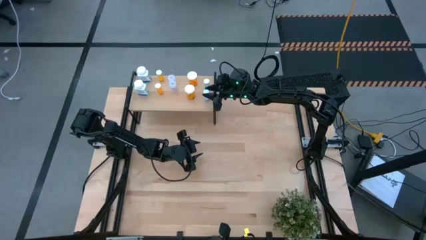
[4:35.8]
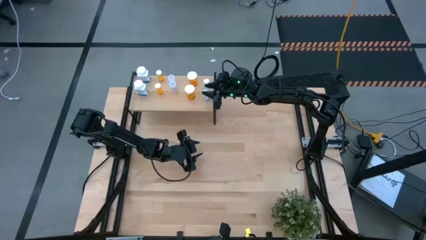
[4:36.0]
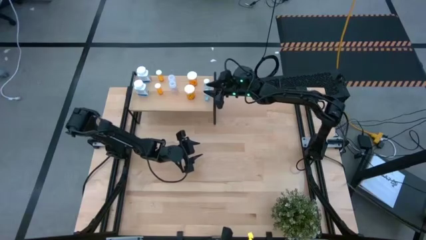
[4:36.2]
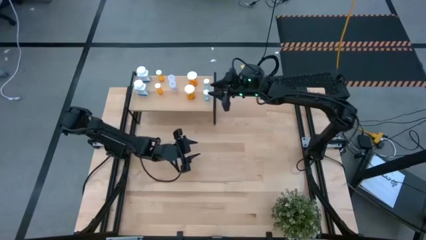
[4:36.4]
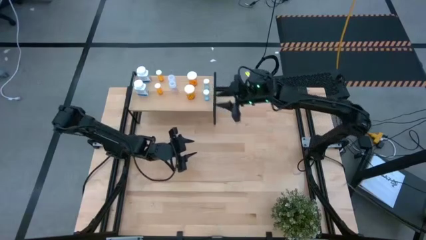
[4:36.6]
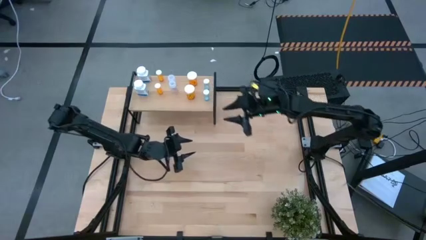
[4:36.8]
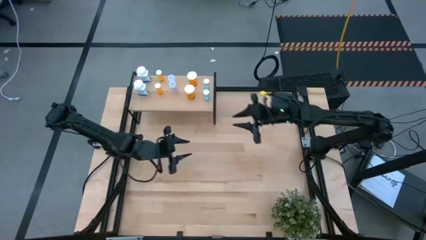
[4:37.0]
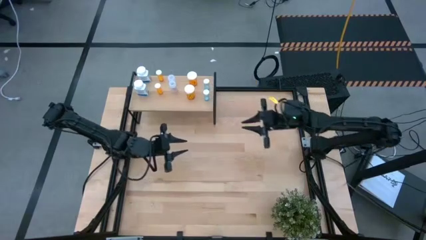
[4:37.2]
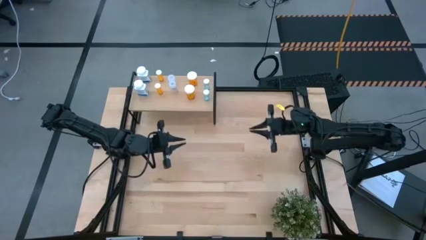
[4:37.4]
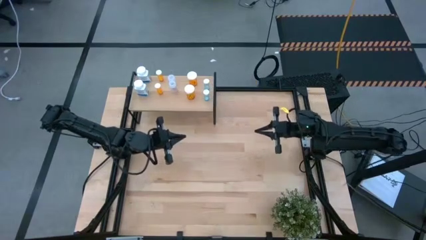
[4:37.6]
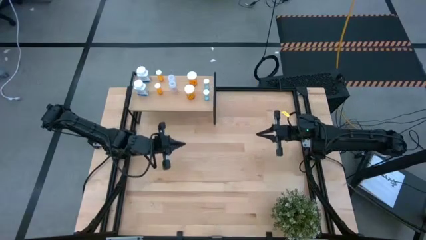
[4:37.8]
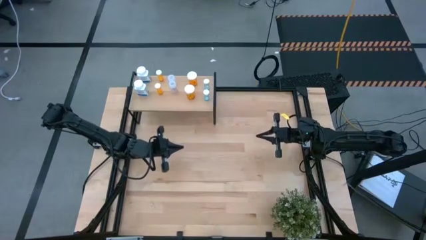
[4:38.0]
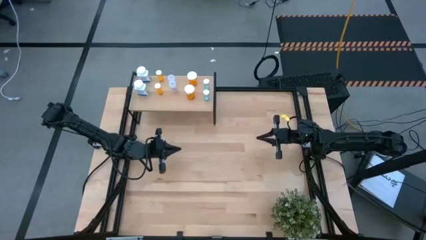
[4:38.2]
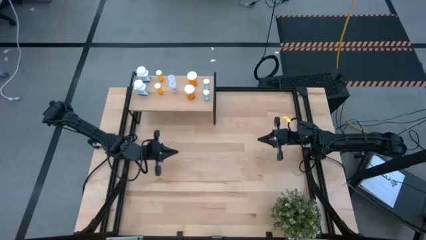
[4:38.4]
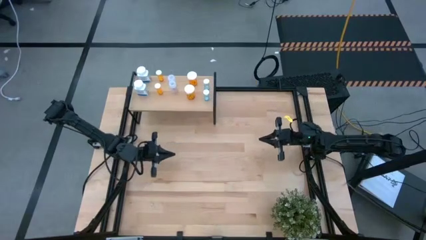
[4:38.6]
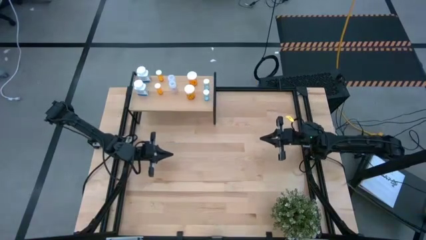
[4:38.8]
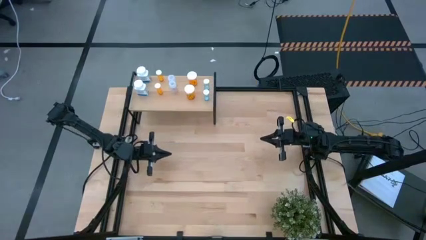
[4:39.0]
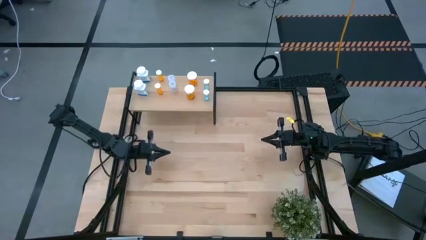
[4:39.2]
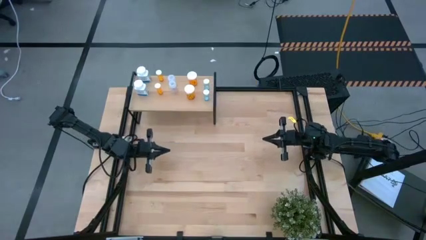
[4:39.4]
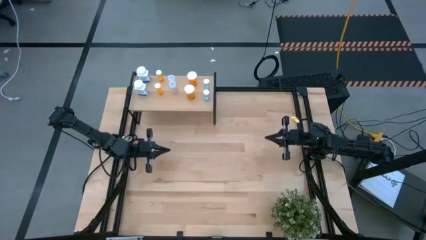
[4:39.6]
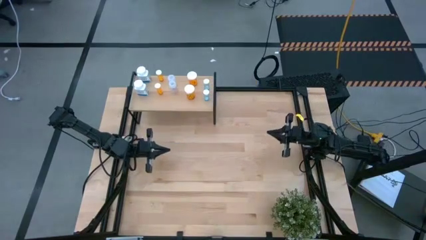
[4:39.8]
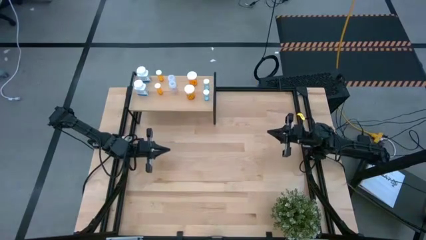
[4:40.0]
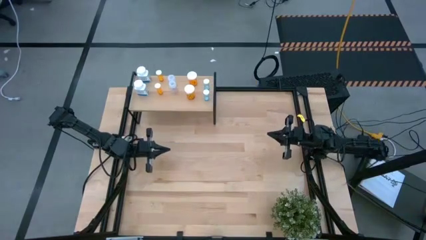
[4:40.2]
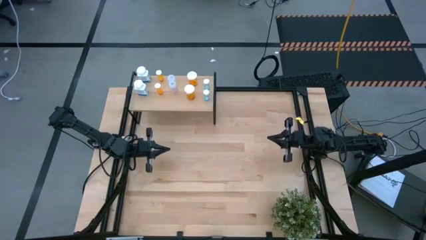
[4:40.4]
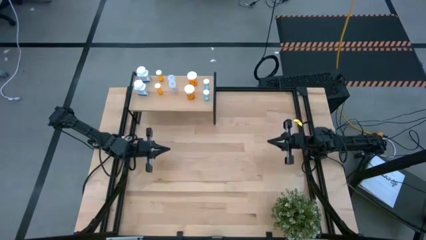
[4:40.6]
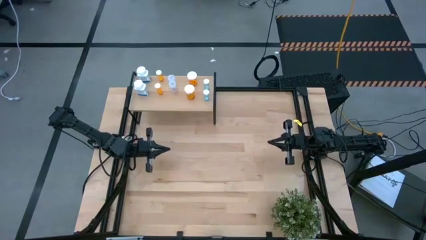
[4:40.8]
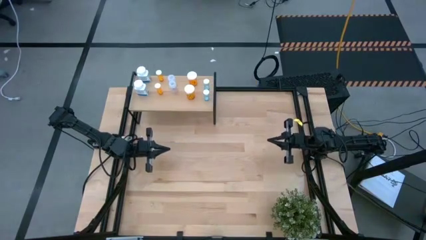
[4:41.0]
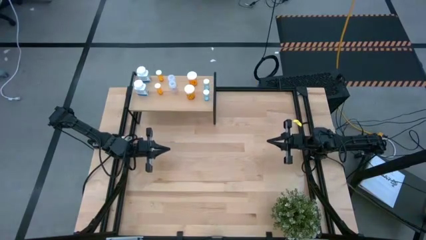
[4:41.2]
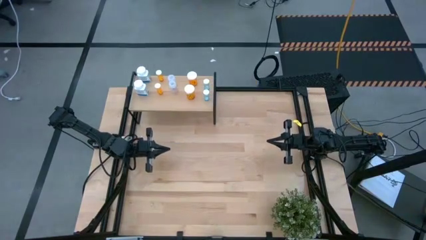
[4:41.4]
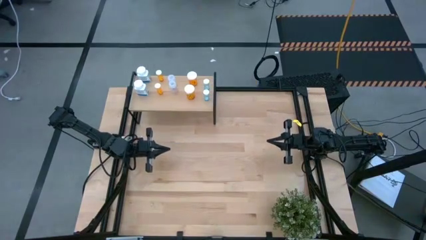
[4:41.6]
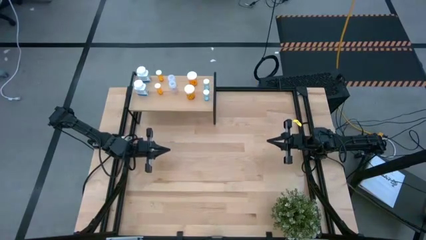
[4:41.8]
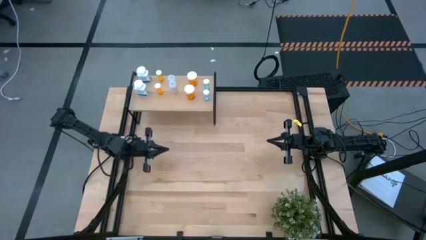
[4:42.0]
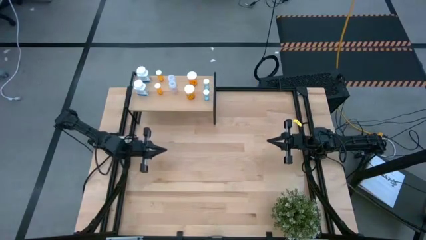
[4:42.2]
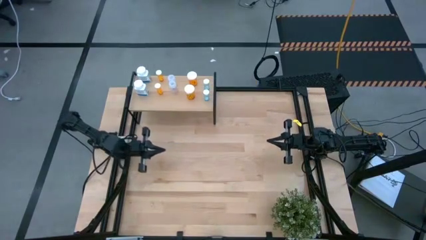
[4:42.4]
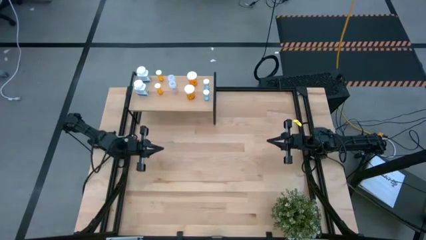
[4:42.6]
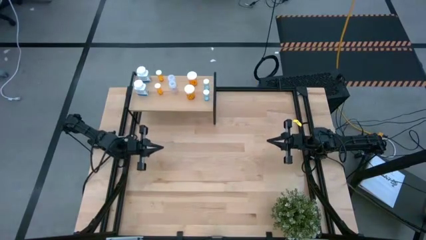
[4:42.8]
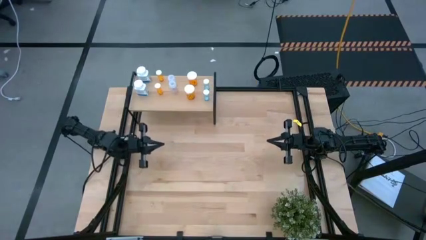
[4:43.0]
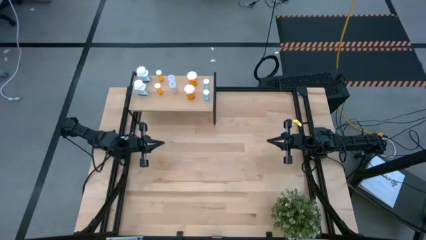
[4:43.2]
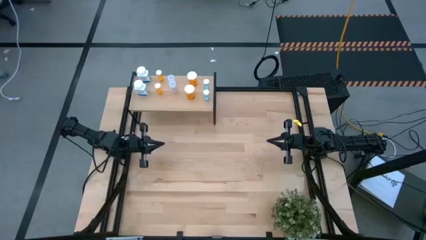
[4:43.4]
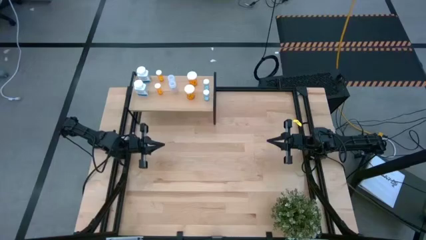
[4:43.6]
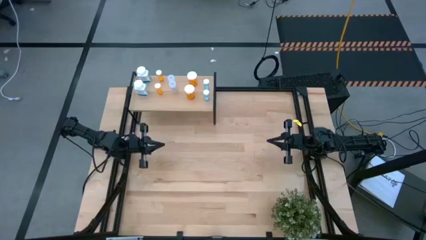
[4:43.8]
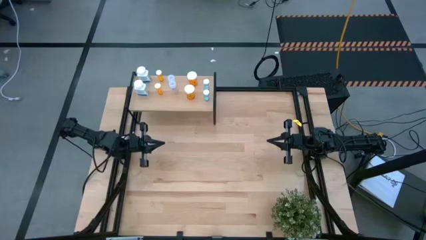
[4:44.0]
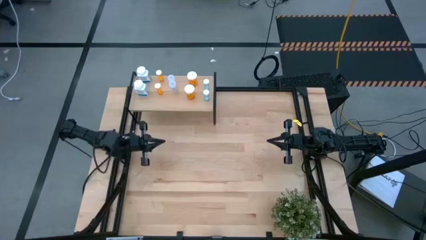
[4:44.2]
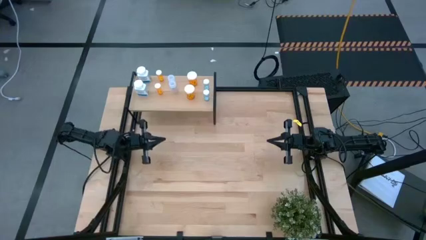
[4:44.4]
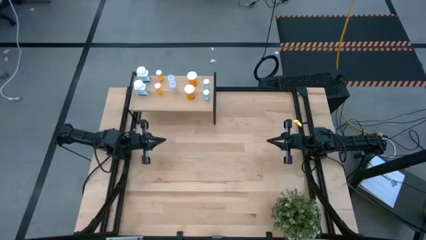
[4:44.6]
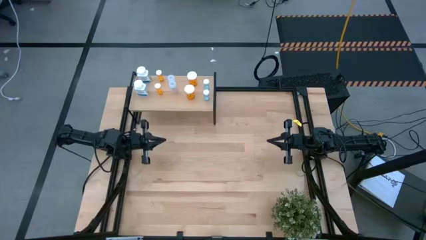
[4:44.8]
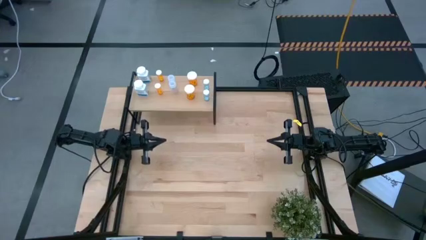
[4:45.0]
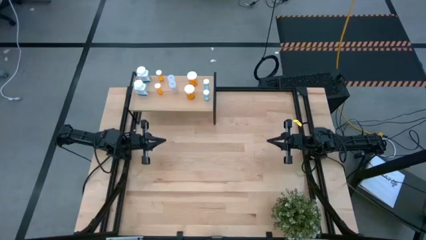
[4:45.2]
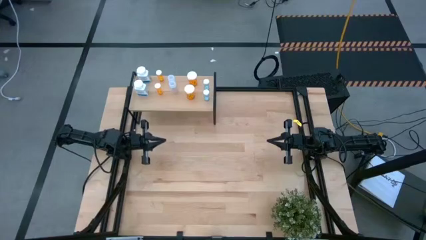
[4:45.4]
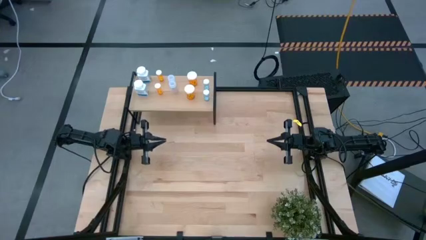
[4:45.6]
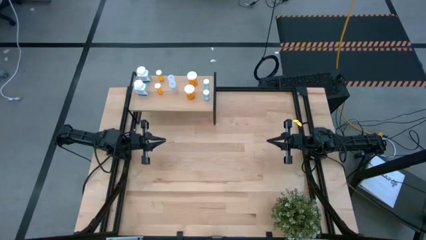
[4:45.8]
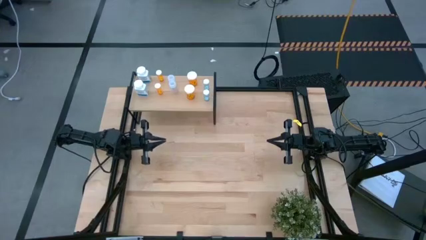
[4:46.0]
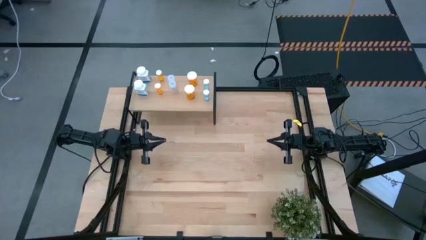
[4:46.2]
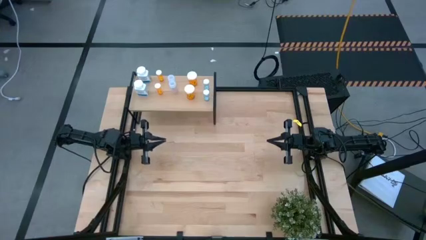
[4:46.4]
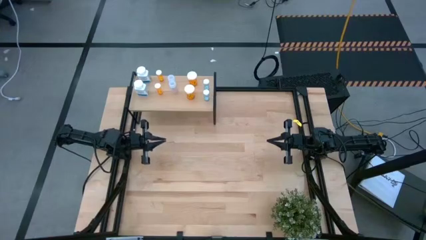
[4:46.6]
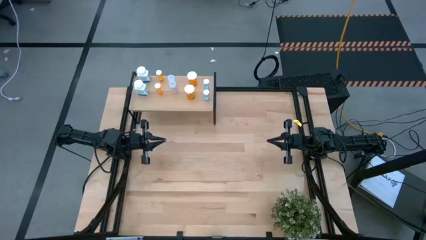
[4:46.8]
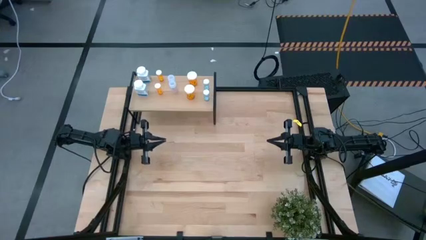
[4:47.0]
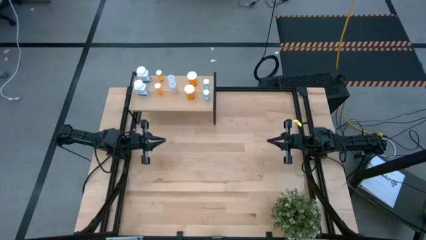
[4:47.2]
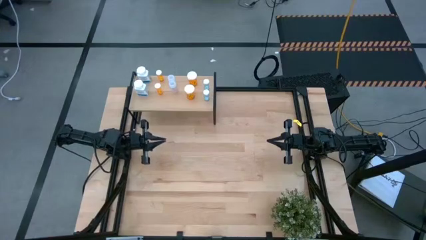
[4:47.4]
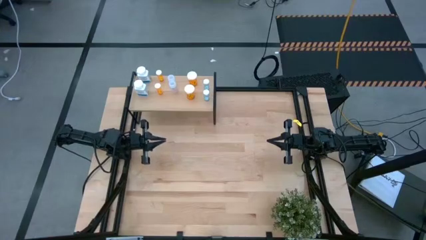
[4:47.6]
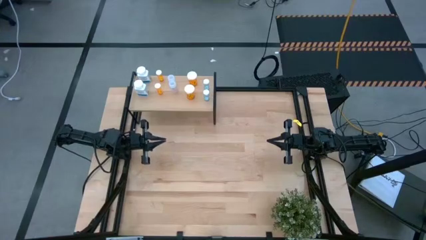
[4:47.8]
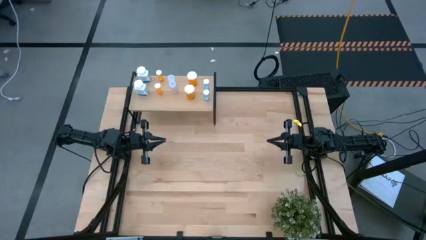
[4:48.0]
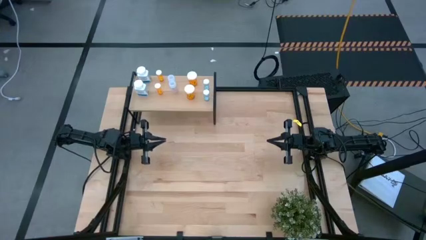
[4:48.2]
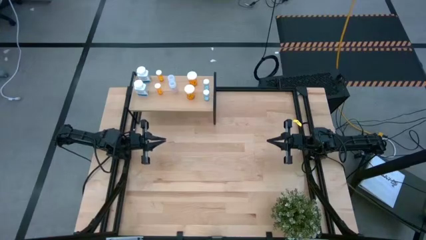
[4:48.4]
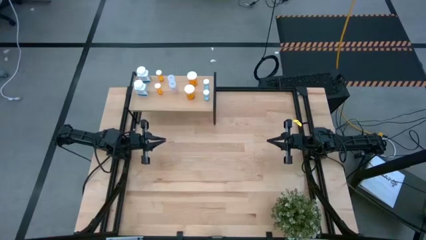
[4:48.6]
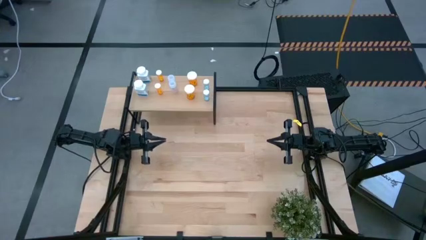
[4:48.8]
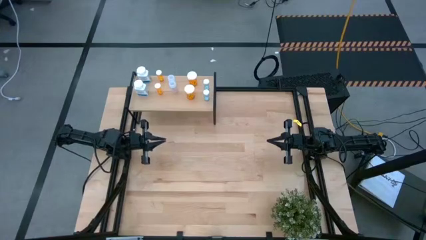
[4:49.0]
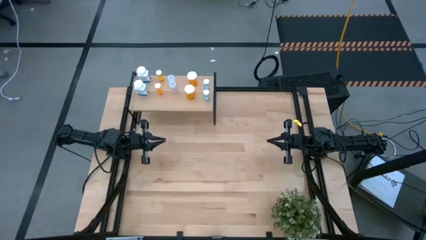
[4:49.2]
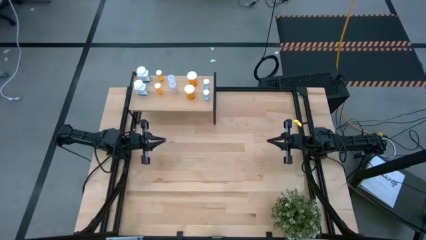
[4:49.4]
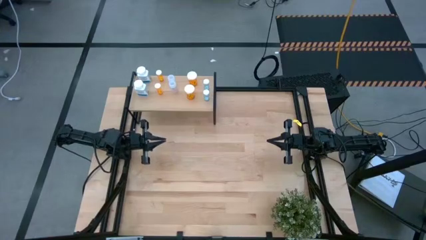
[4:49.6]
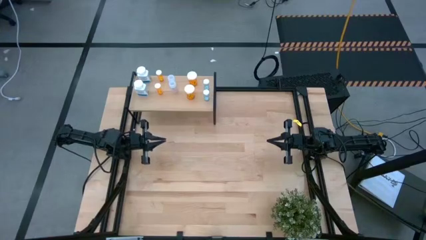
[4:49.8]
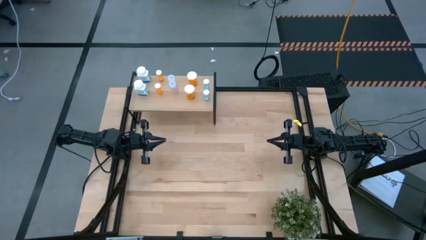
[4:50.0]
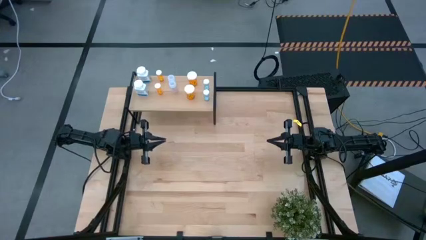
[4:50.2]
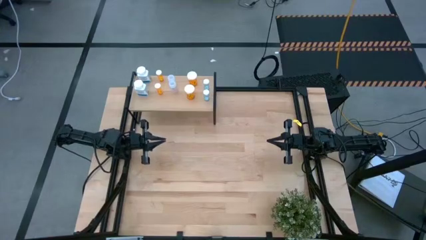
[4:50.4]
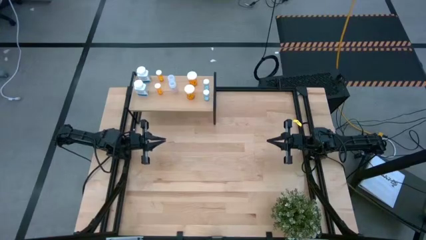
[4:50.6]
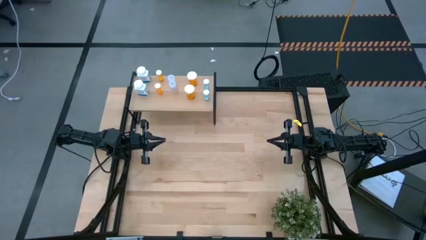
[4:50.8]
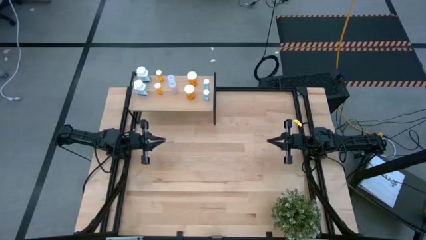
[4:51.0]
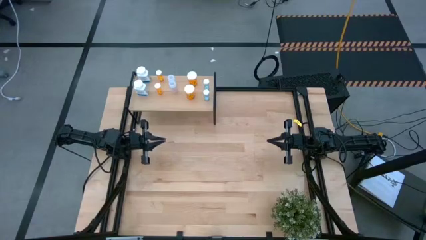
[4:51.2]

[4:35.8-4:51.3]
Task: Pick and place medicine bottles onto shelf by color
Return to Home Position
